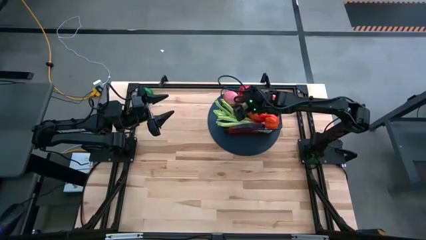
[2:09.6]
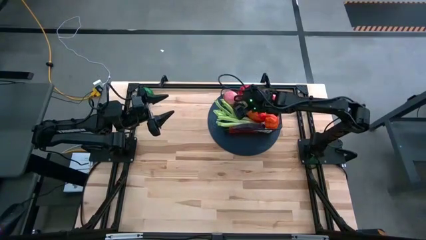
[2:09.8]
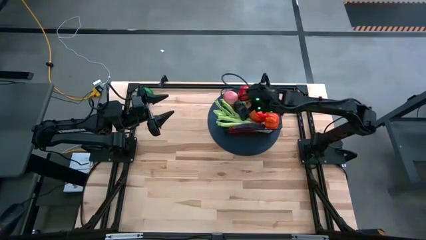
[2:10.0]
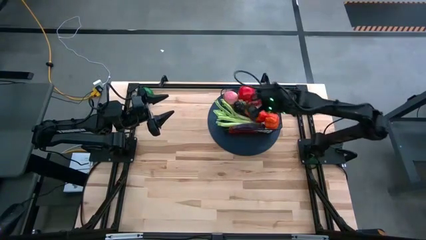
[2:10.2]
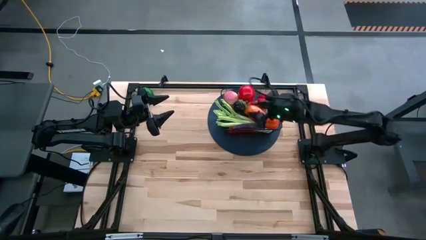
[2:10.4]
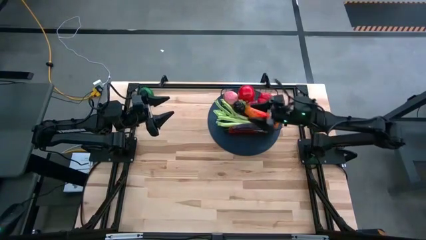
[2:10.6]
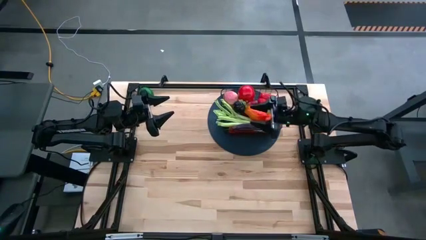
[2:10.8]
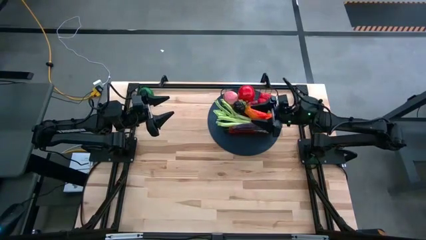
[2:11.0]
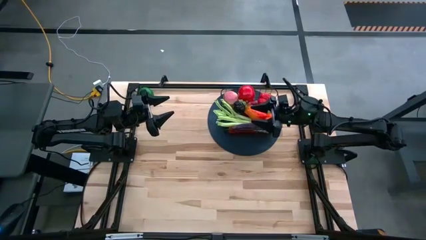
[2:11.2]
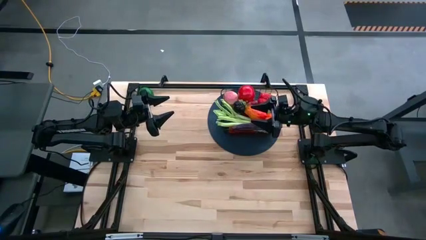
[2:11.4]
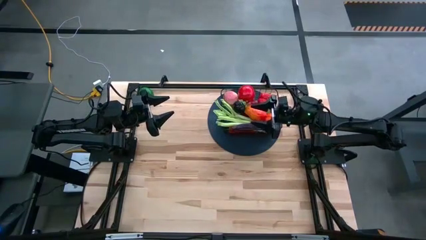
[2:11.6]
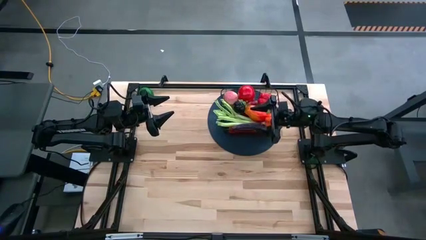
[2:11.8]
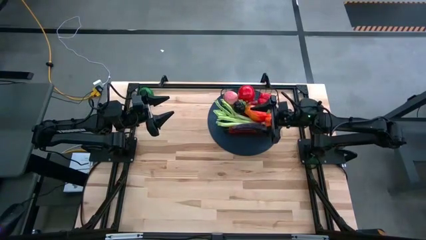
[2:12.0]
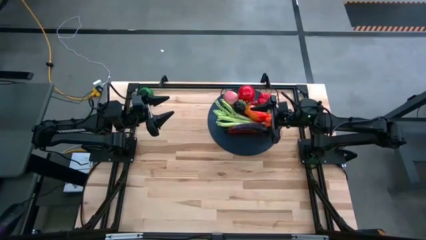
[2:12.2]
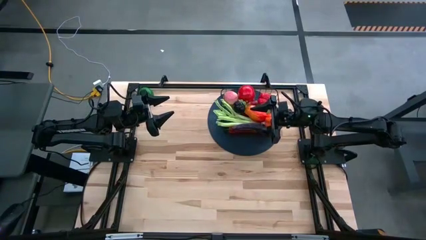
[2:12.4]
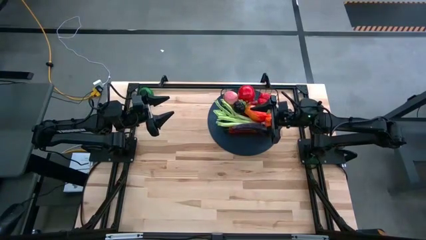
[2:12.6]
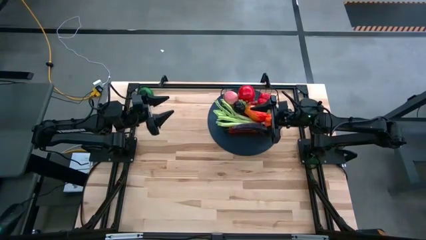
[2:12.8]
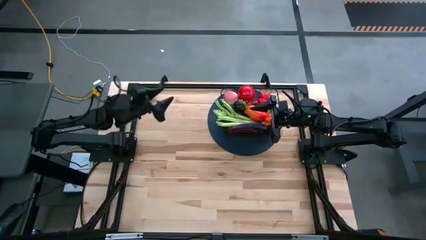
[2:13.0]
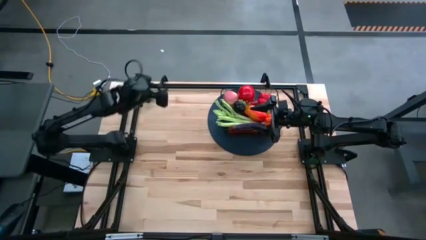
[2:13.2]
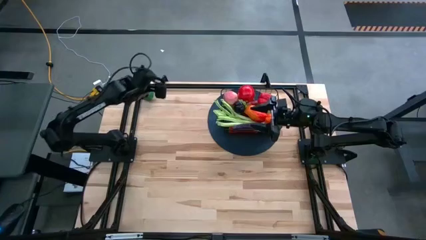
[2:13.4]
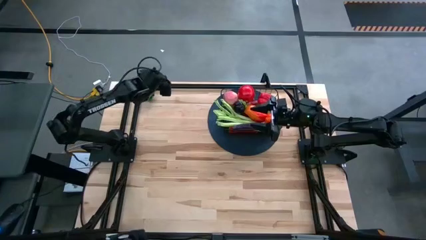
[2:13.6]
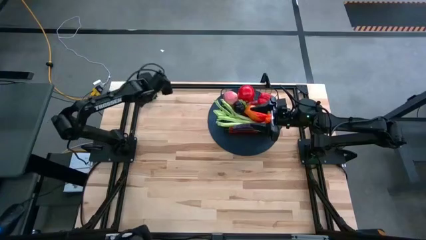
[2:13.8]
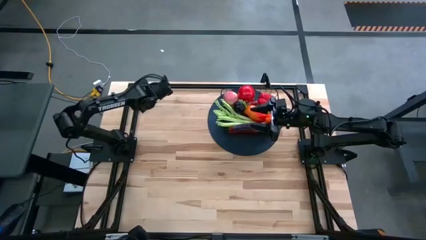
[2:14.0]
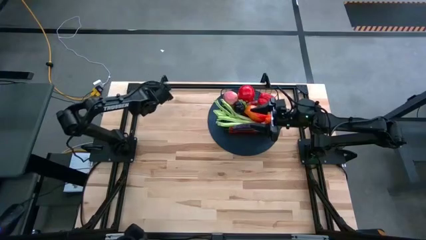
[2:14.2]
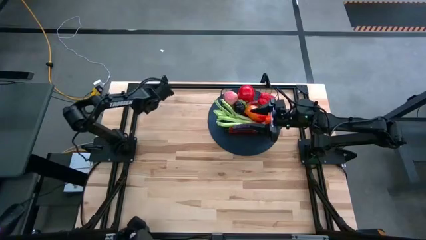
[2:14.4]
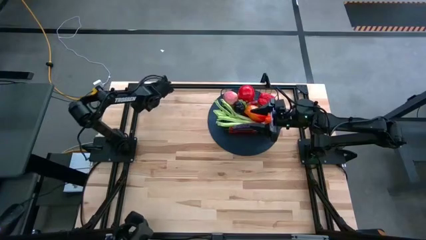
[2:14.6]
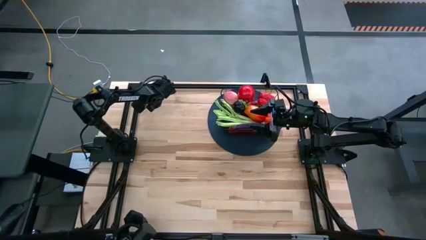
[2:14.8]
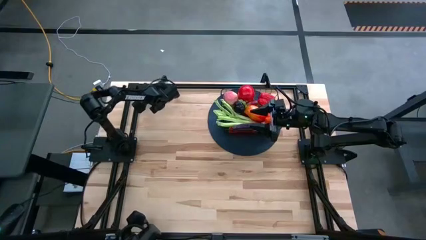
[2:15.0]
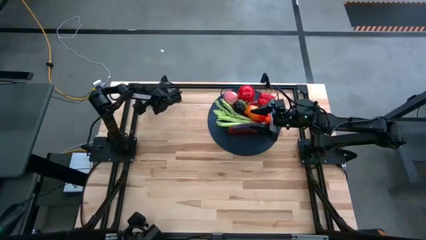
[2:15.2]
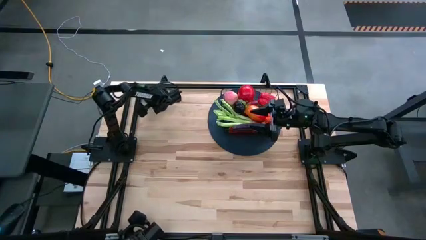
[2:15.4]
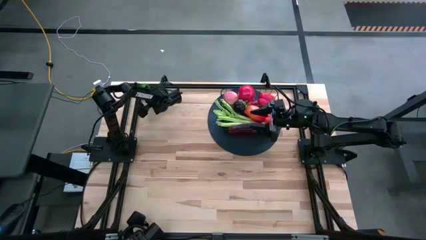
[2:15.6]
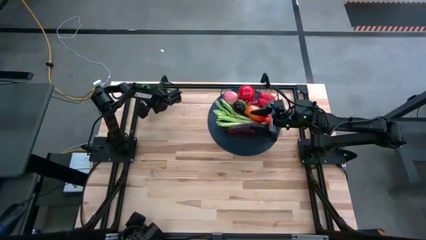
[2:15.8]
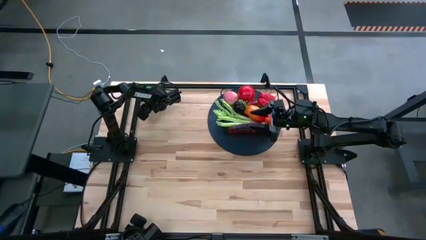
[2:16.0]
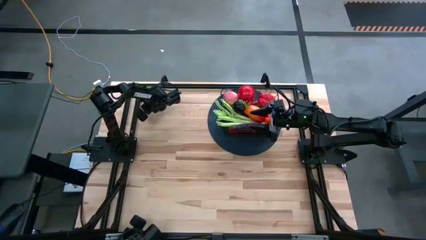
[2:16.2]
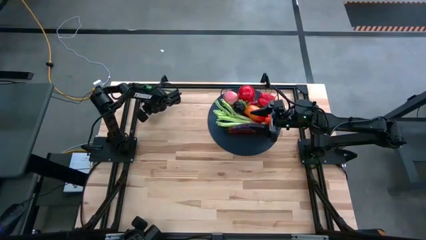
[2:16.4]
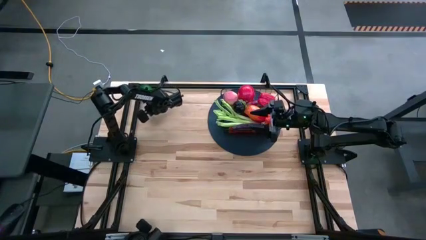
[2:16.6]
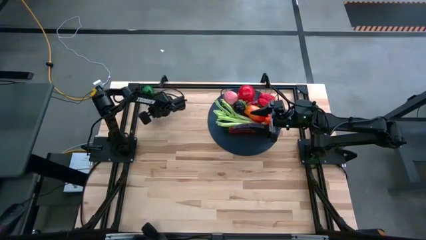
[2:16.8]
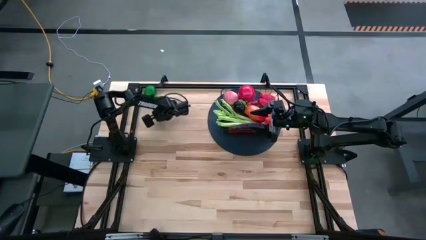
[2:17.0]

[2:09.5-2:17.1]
Task: Build produce basket
Put the lime into the black wire basket

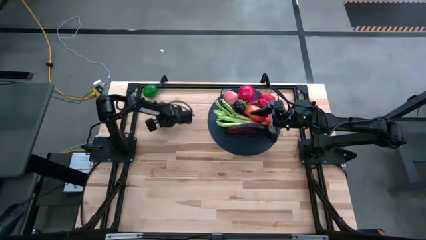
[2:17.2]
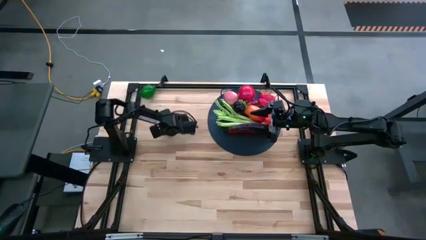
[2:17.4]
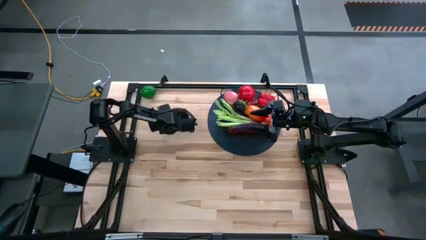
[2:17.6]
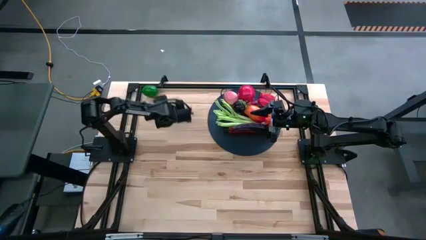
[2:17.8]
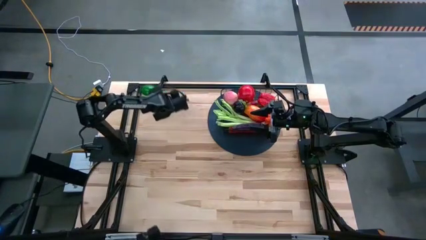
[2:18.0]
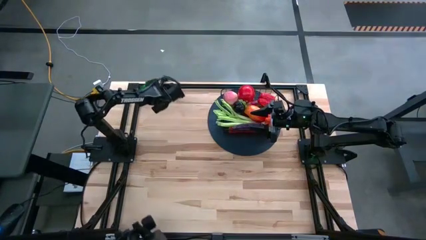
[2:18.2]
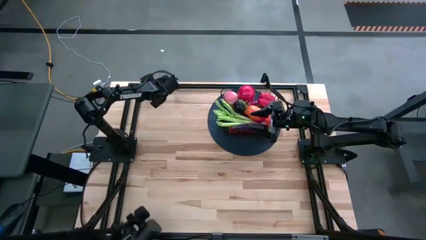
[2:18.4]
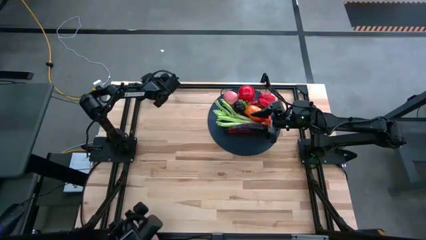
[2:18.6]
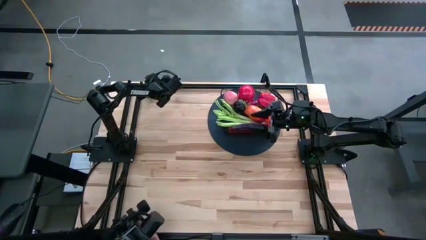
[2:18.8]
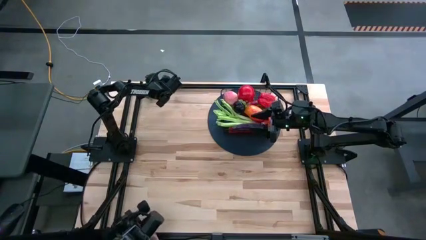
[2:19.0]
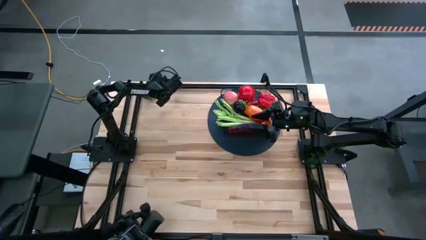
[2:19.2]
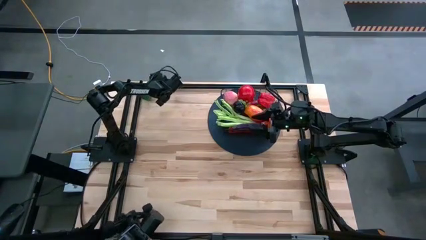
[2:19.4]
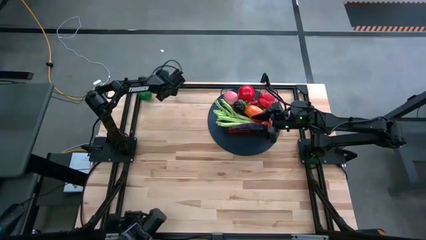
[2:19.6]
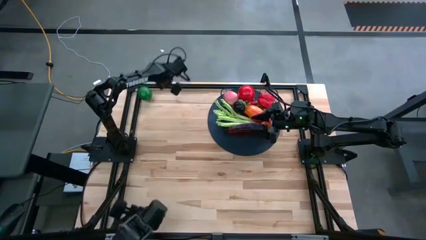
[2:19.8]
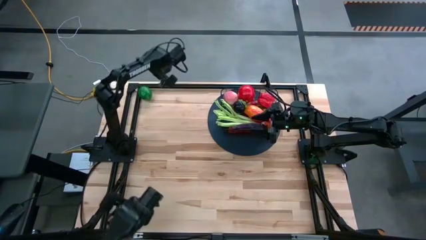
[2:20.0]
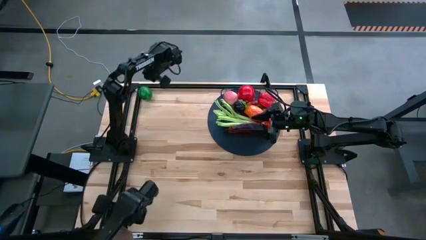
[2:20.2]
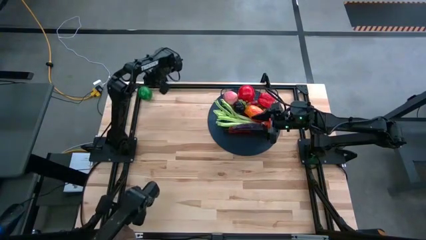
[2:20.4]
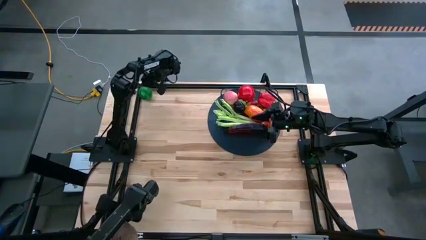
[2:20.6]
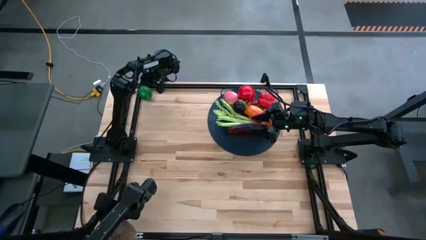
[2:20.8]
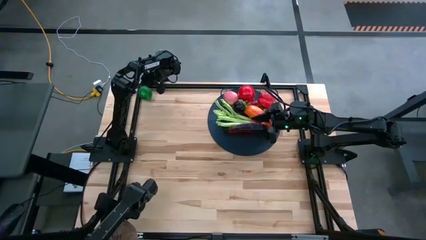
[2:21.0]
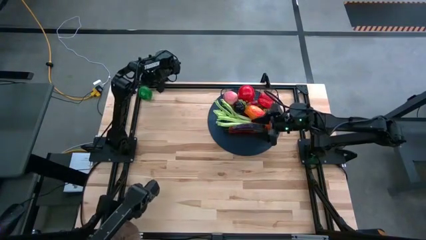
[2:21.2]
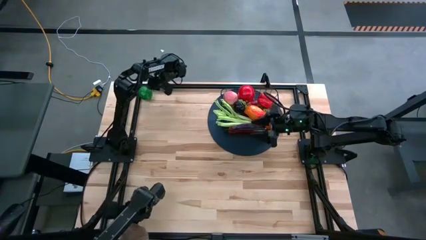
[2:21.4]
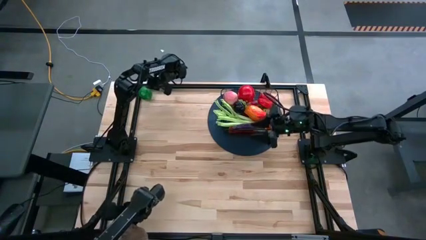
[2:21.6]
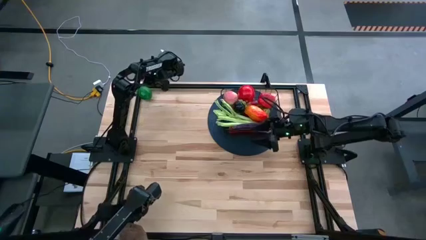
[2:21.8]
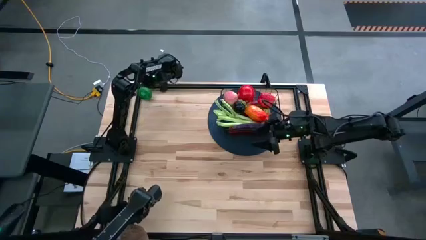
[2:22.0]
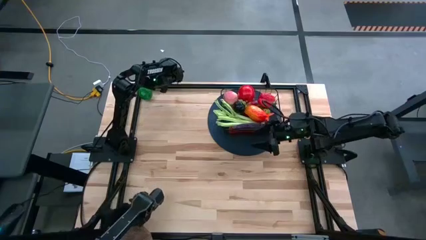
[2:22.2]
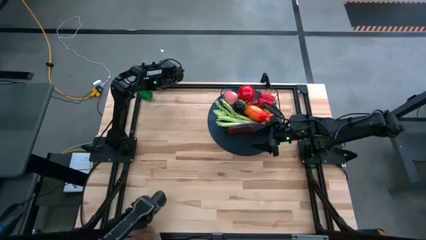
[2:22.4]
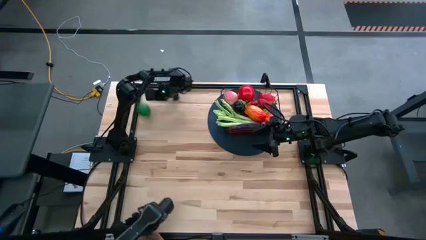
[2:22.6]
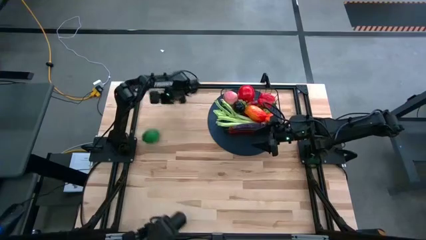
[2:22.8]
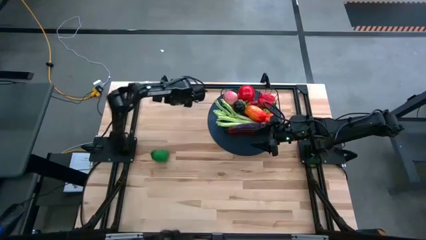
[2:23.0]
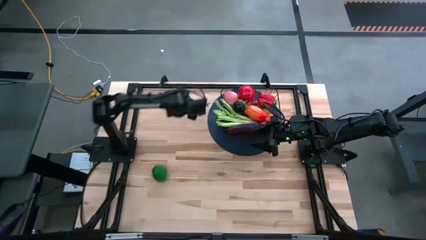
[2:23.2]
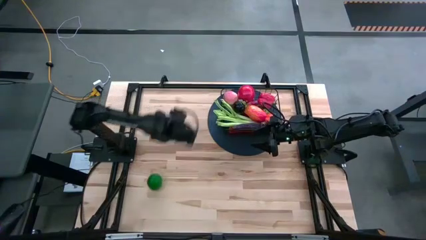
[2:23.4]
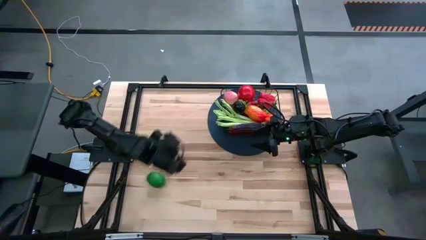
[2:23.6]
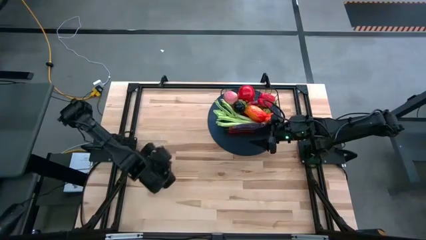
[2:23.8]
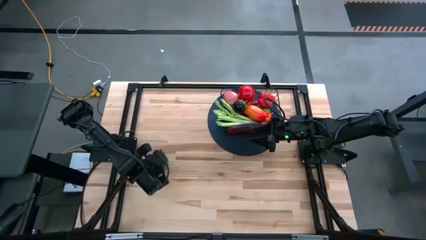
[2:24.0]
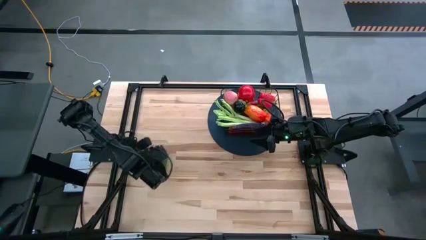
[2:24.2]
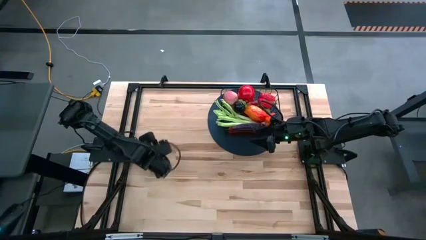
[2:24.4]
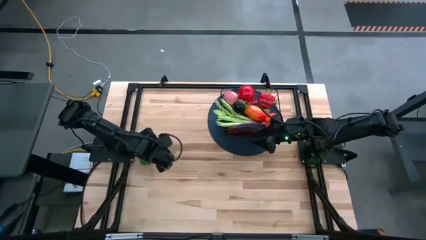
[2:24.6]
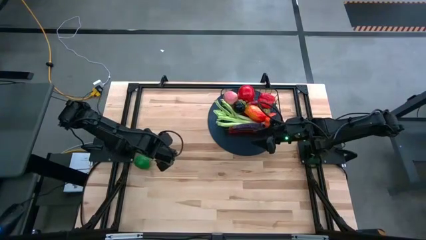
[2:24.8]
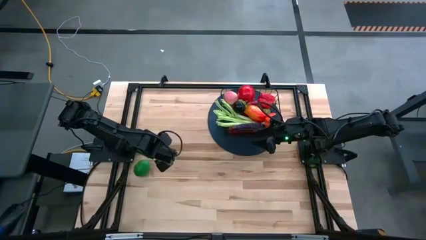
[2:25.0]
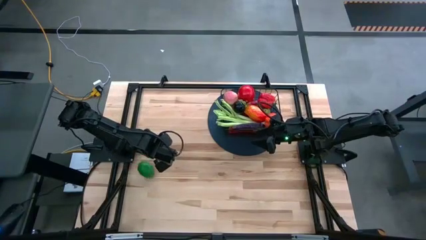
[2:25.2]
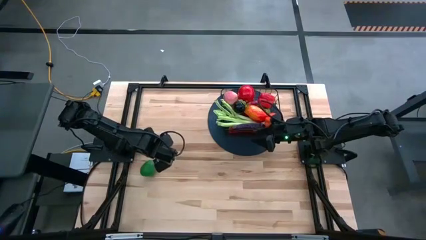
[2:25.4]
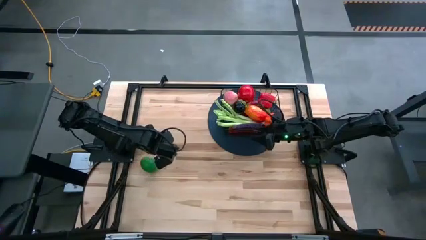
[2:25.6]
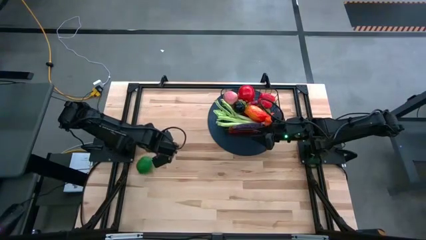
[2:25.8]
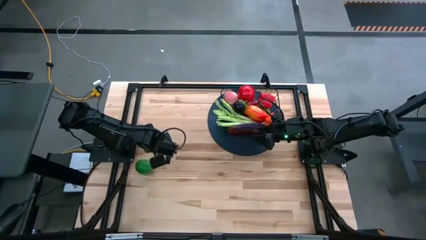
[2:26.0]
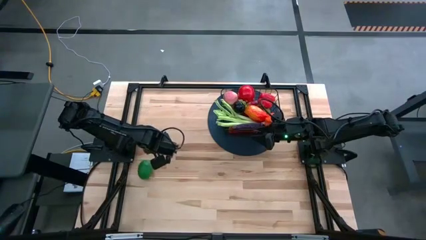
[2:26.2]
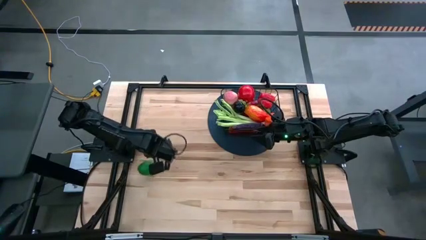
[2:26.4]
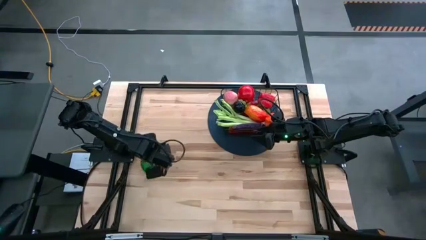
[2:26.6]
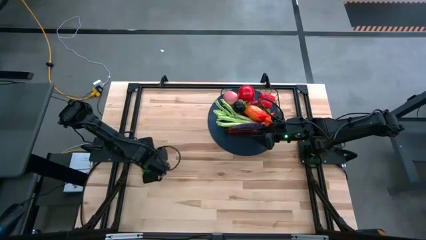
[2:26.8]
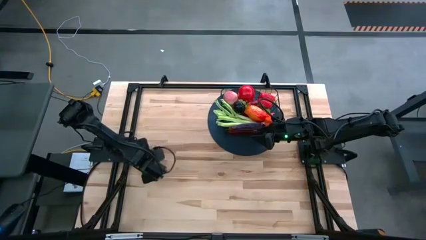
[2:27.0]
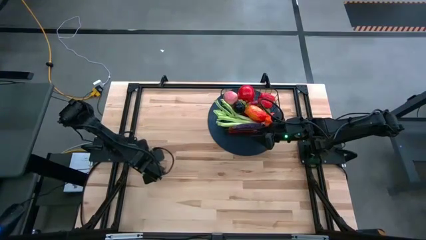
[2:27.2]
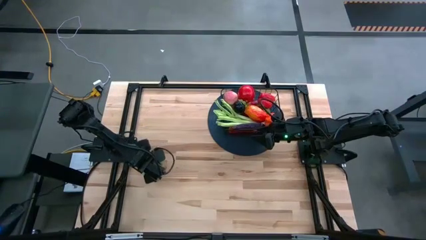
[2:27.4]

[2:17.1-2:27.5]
Put the lime into the black wire basket
